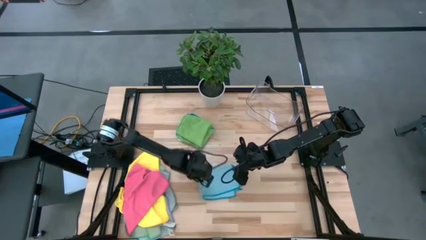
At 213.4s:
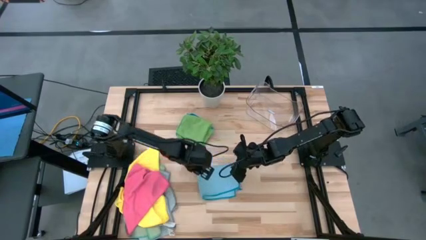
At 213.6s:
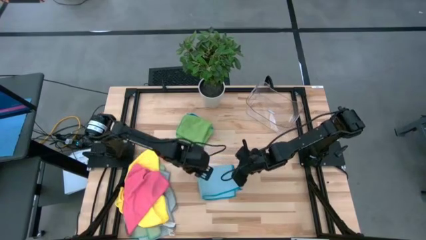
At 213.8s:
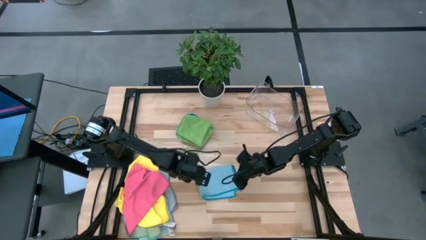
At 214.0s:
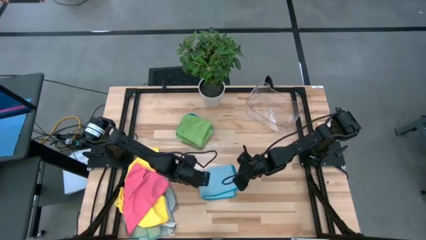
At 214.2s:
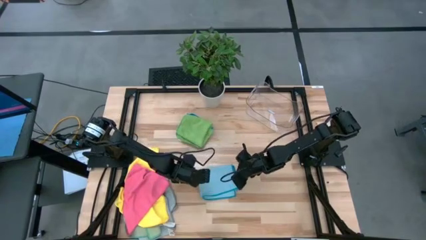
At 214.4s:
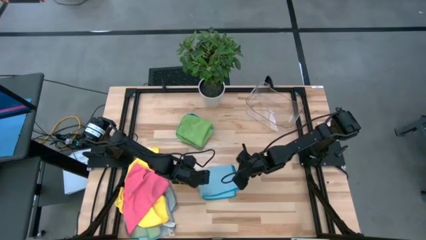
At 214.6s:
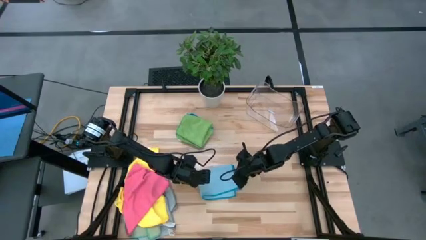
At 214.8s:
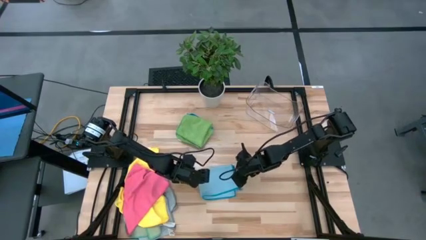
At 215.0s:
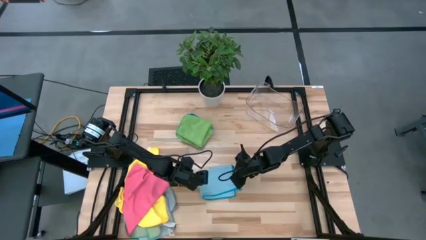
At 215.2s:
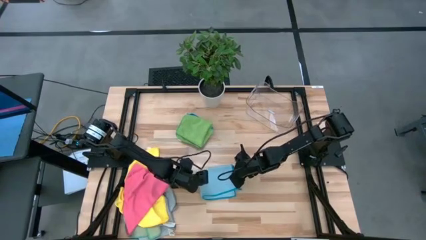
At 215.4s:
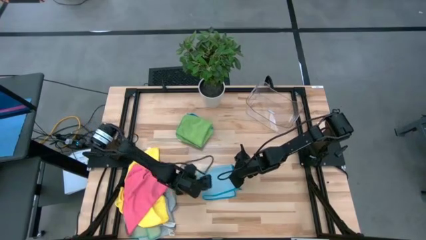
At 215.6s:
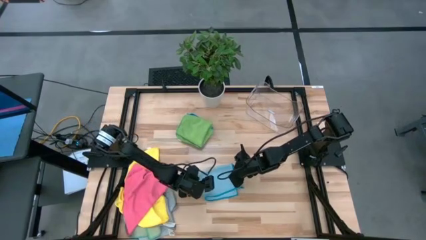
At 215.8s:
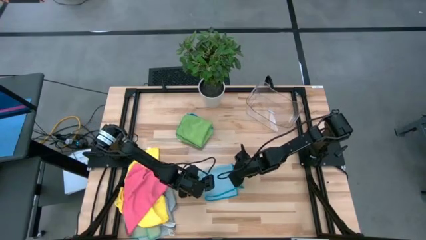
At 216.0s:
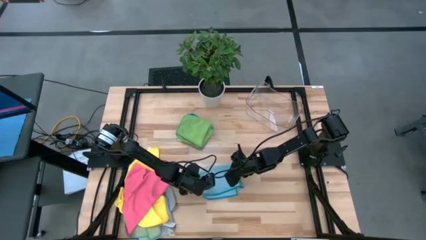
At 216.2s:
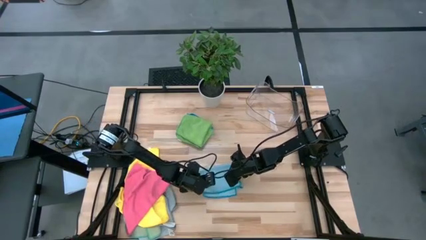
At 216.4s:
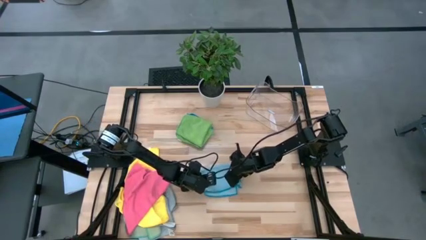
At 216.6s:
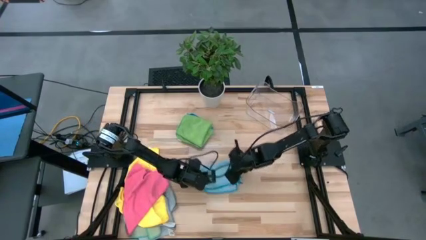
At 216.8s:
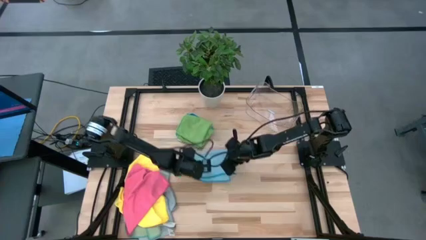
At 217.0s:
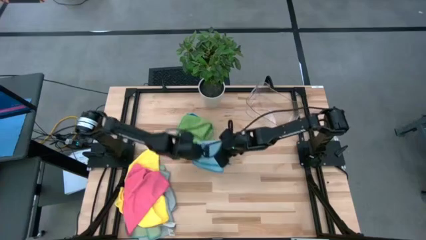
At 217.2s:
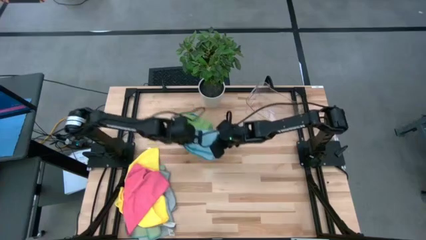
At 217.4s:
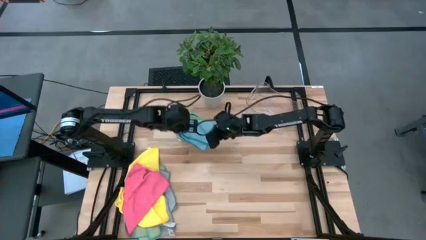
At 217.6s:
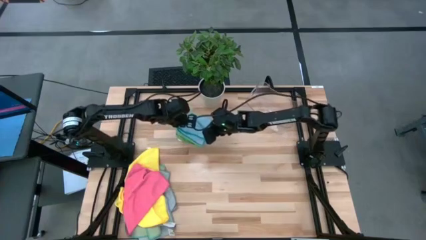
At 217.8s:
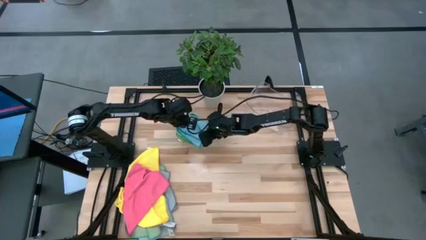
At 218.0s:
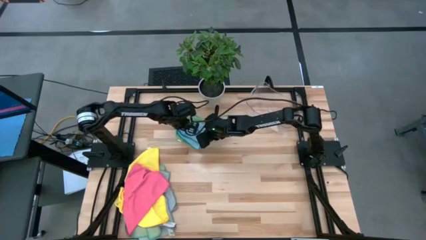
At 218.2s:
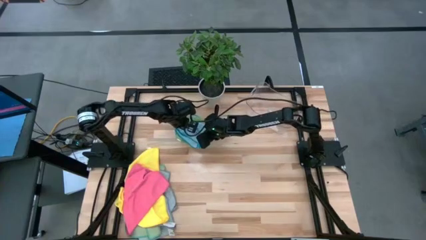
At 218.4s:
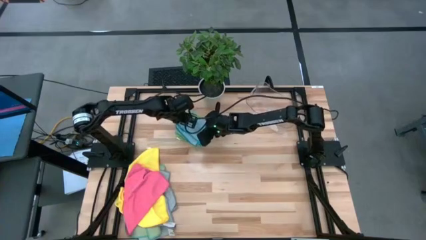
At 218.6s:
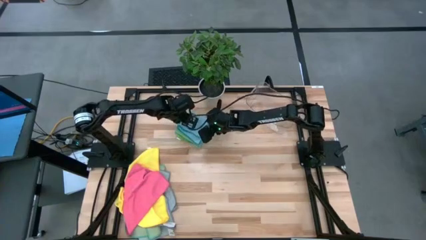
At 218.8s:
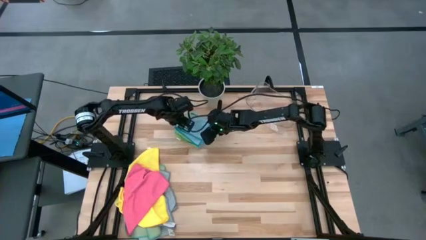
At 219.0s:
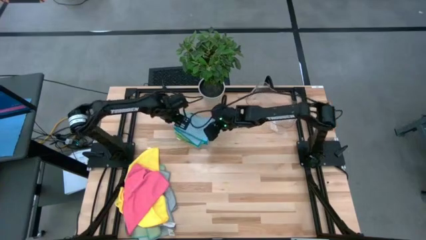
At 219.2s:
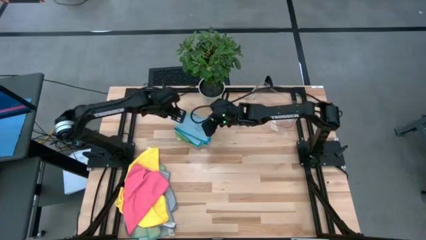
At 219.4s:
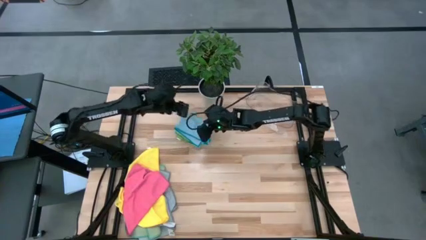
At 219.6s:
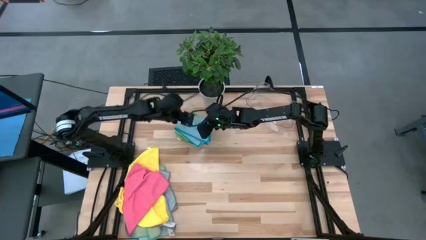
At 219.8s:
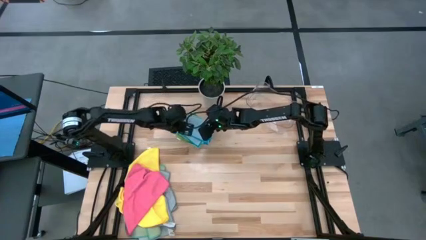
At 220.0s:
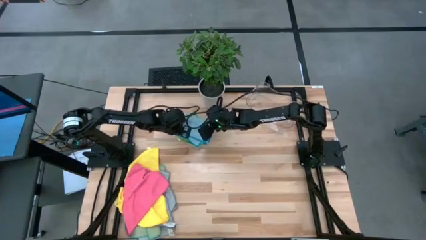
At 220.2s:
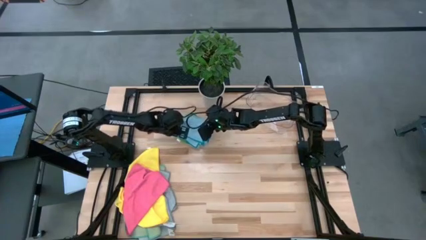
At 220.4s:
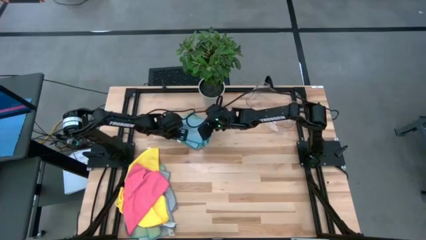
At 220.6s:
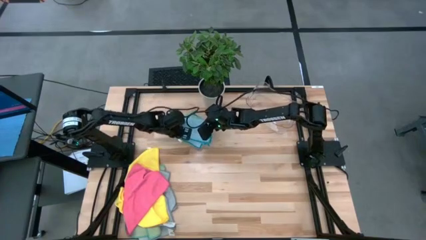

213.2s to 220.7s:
Task: Fold microfiber towels
Stack the light blue microfiber towel on the green microfiber towel

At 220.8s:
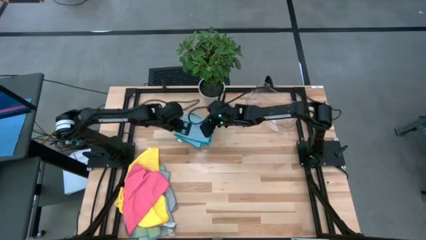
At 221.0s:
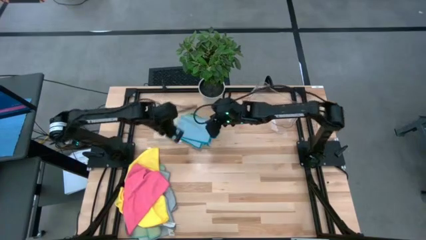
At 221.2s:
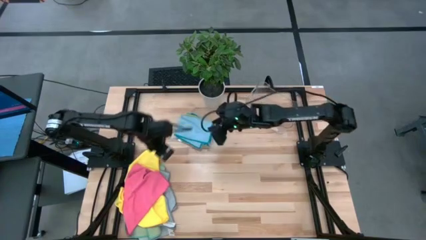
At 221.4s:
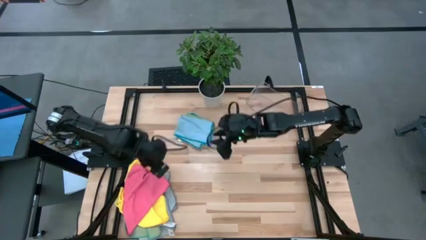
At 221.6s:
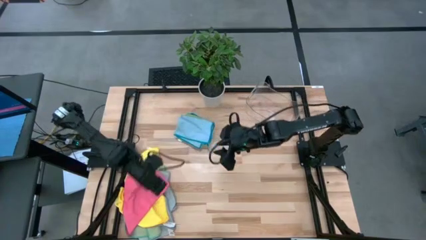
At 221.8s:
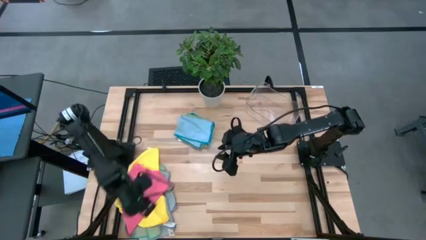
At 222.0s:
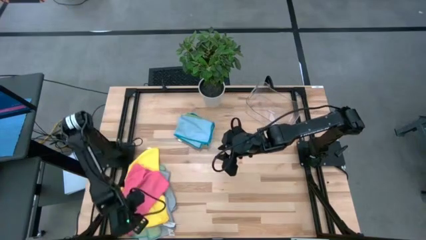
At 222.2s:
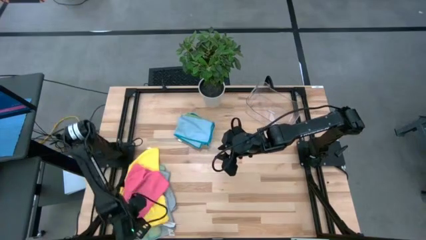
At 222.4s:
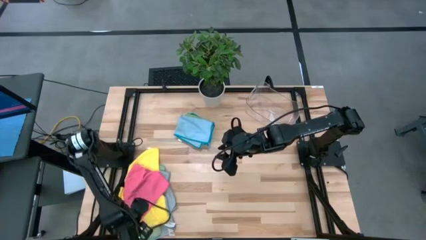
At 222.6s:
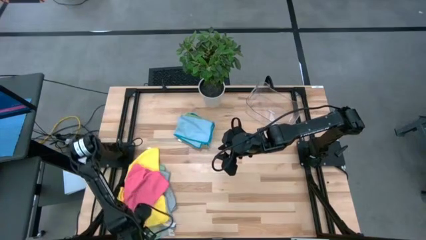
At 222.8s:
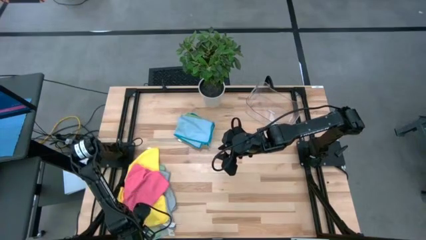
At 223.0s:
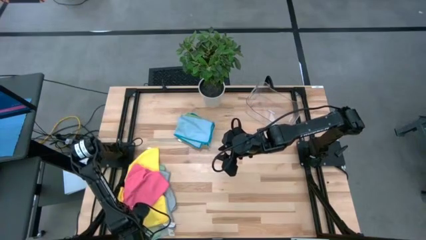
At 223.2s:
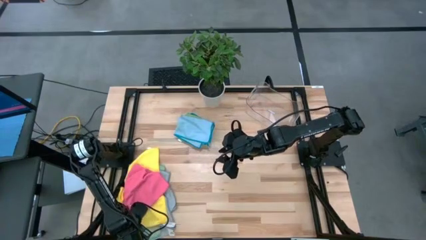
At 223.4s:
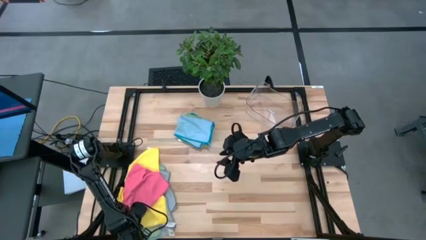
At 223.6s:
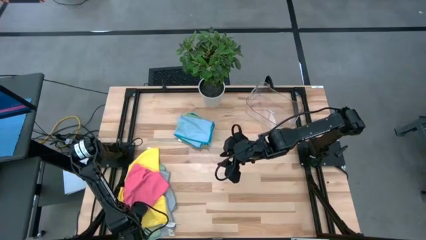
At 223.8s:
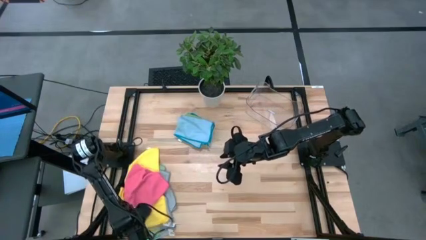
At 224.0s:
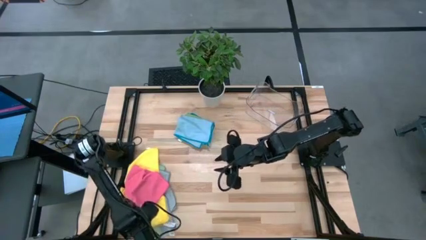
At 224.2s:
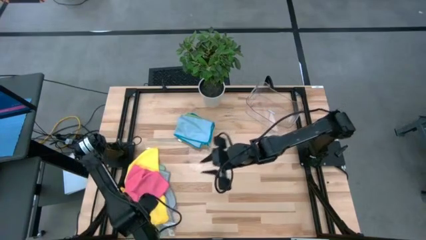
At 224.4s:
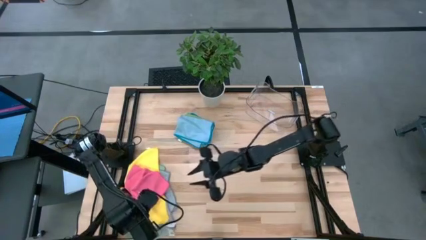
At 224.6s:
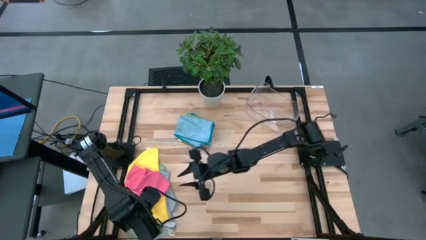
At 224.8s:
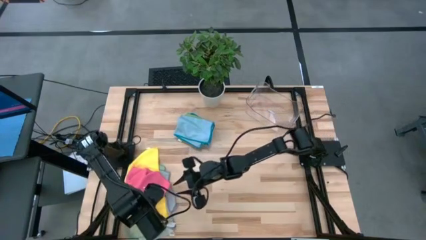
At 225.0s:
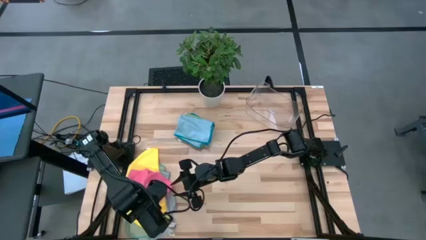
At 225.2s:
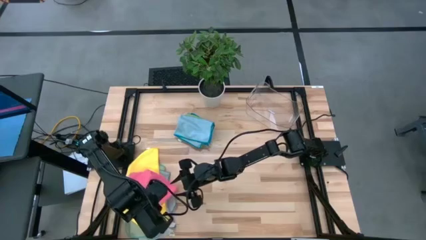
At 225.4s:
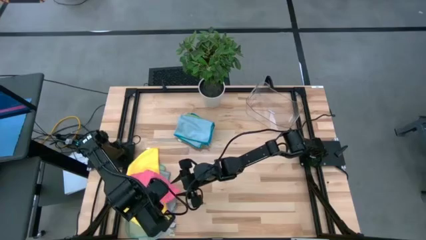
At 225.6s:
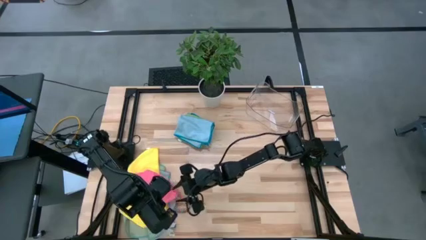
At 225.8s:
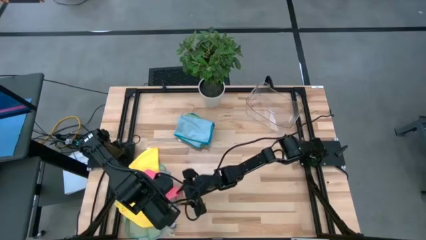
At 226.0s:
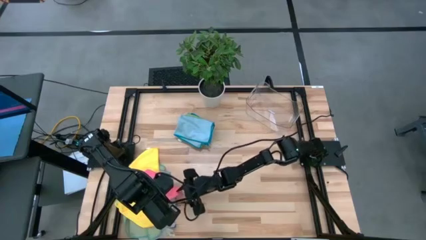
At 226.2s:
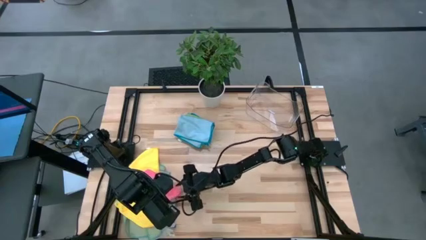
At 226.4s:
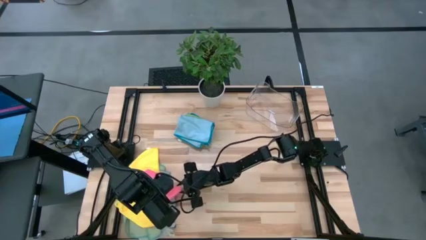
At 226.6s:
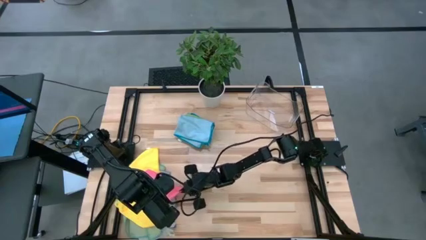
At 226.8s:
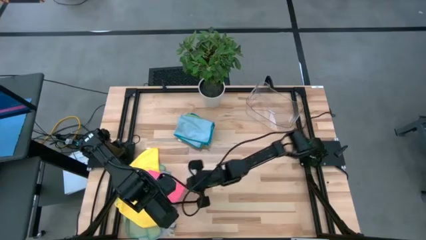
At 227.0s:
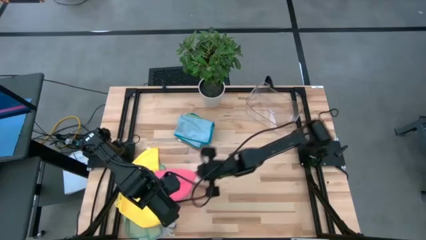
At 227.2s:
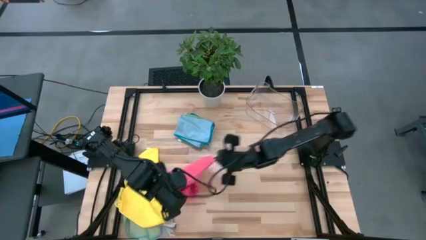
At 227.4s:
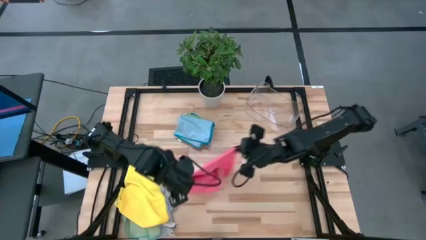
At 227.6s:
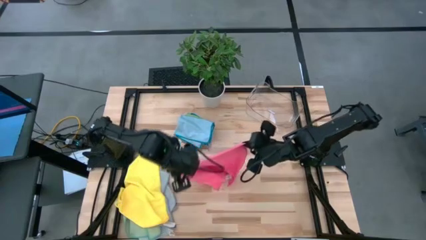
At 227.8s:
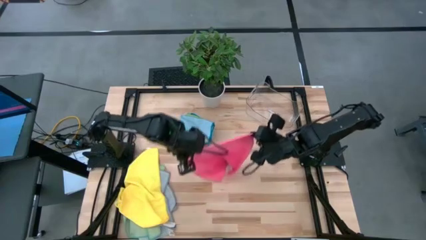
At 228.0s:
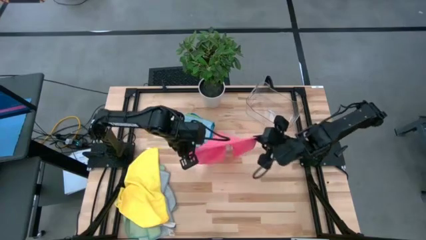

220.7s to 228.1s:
Fold the pink microfiber towel

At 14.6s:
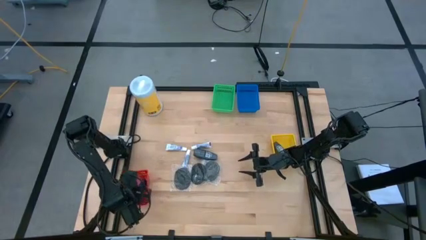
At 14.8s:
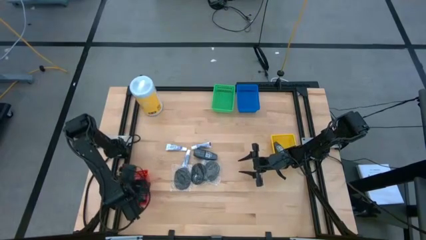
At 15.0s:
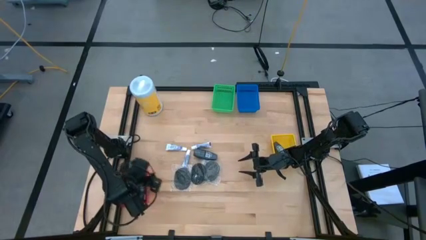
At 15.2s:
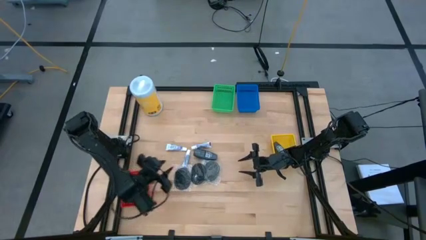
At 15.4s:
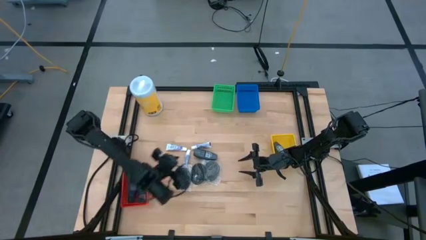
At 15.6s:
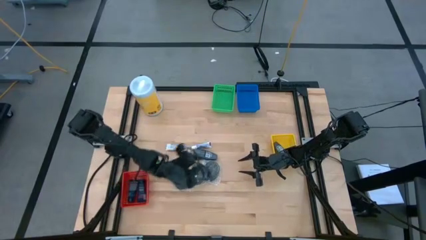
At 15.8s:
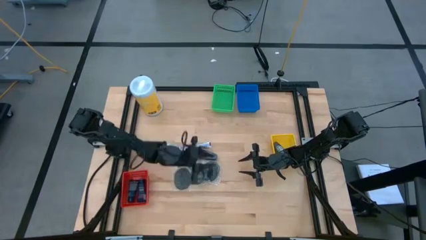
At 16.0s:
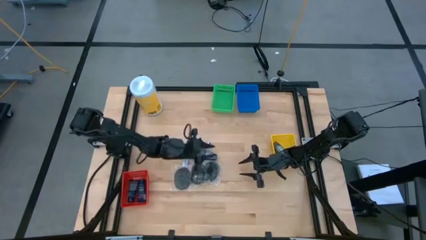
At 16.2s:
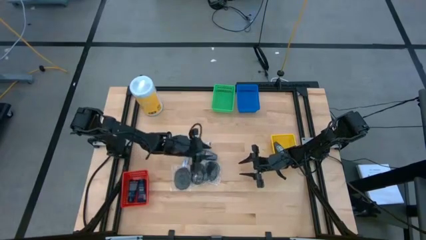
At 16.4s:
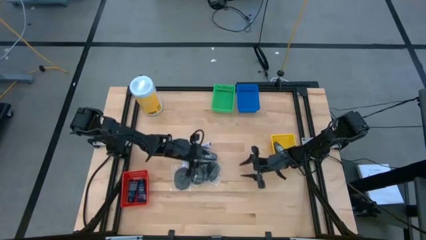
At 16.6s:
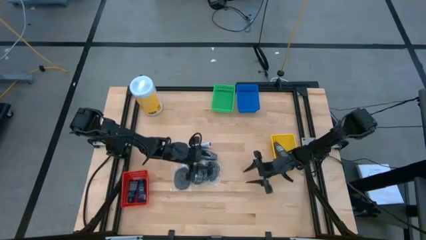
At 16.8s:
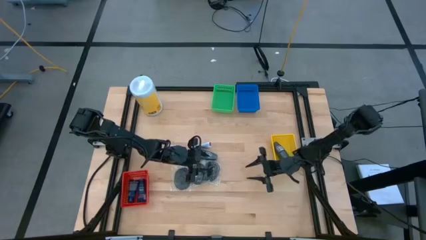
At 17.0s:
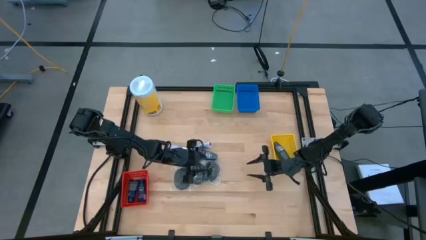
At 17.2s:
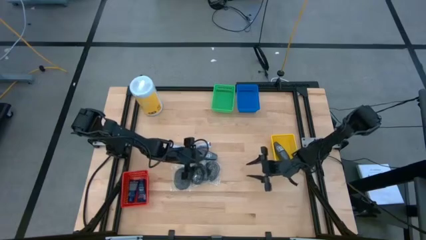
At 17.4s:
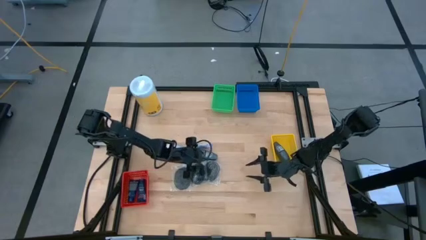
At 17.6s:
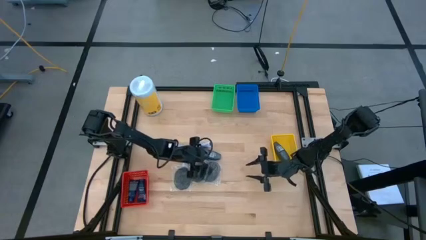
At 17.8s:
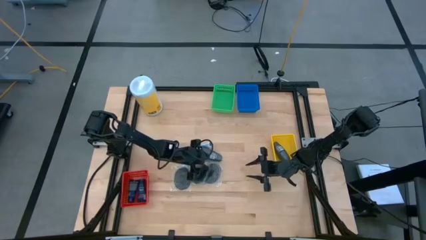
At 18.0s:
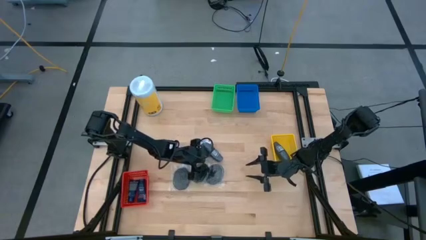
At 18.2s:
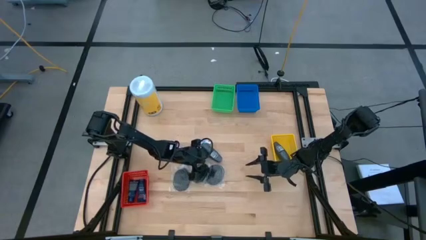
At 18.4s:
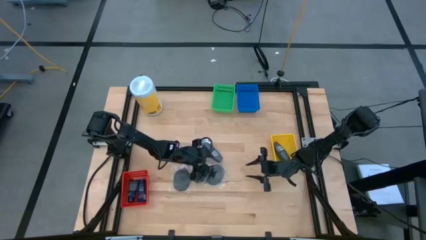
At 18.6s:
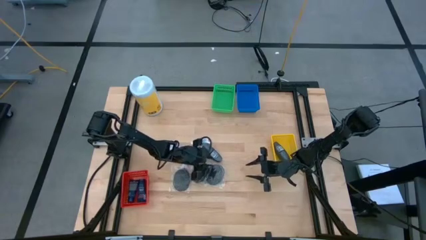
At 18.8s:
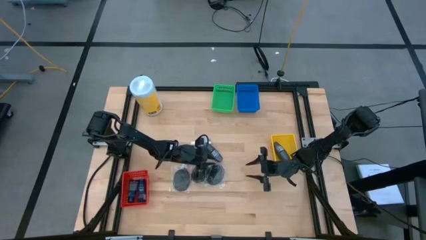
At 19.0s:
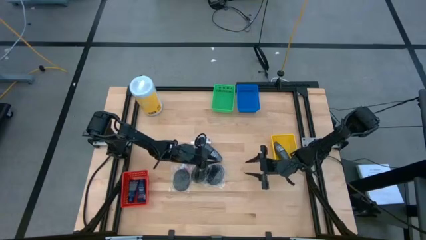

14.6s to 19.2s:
Task: Pick & Place Travel size toiletries
Put the gray deodorant into the yellow basket
